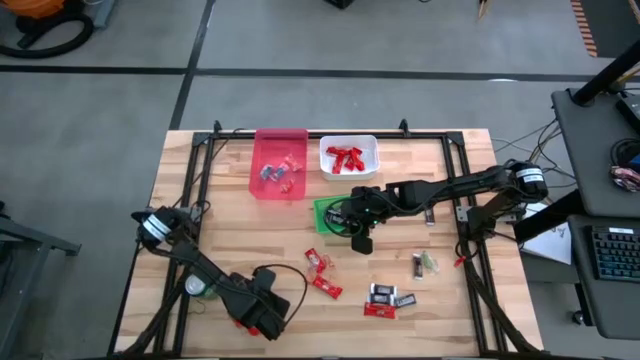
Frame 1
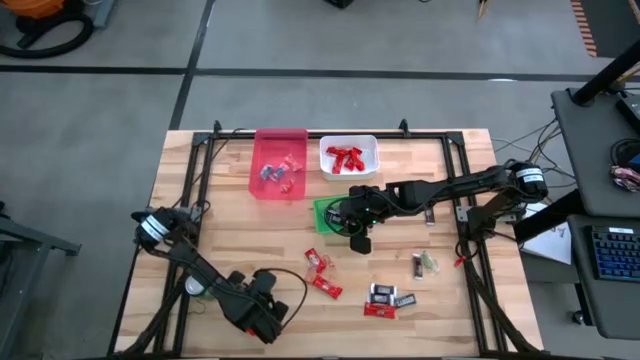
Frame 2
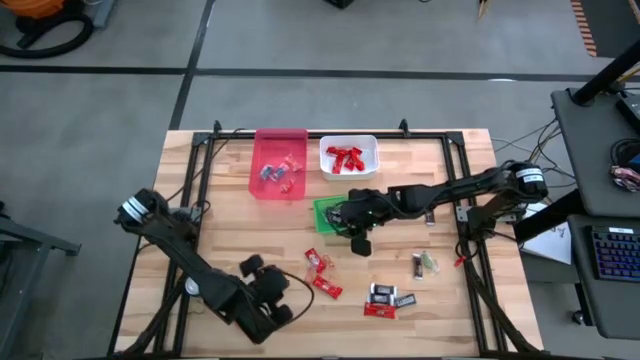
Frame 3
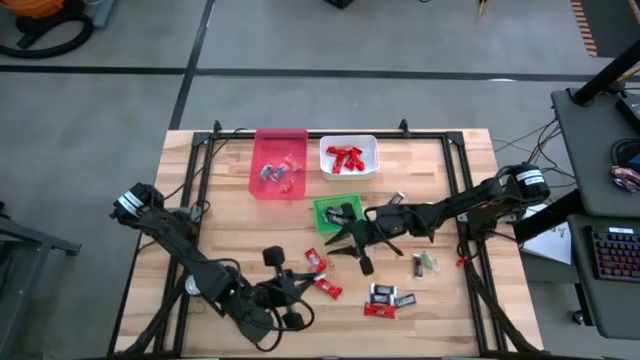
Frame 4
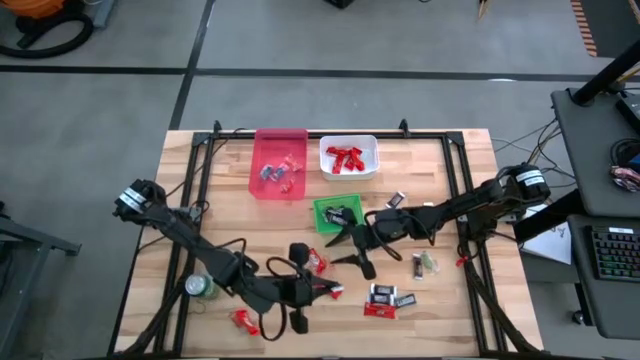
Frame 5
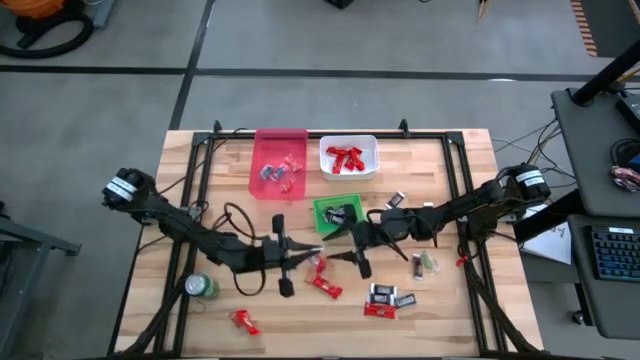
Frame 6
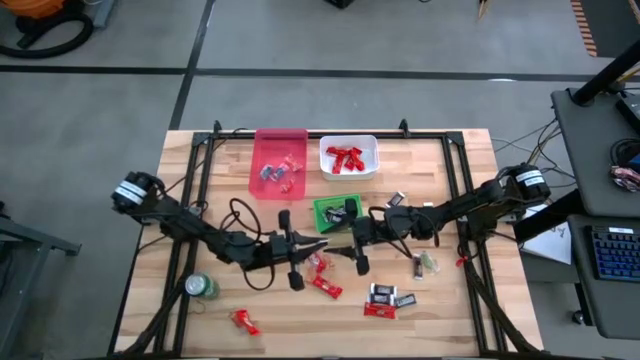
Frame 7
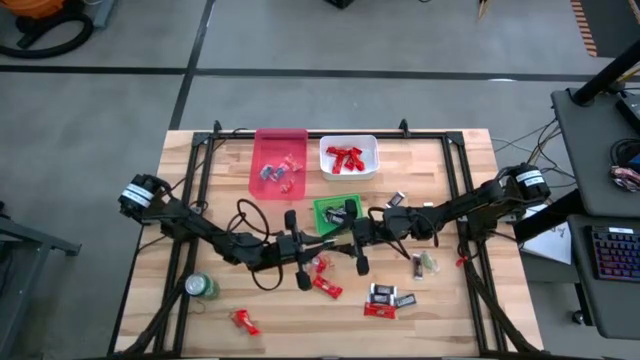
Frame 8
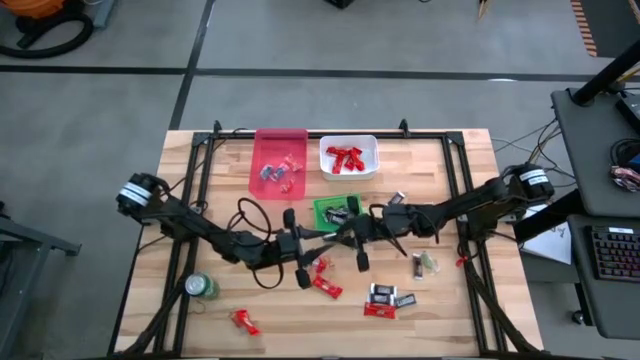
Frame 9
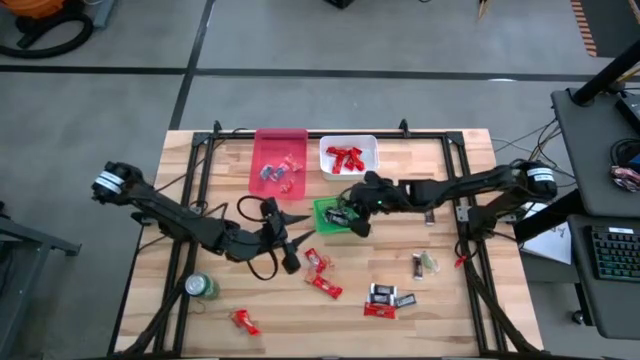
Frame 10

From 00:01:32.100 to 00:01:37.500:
Task: Sort candy
Put the brown chocolate bar into the green bin

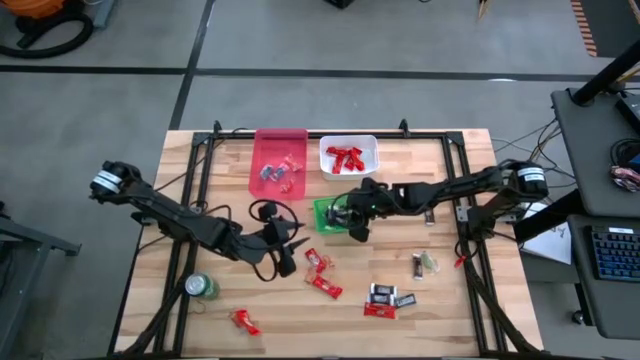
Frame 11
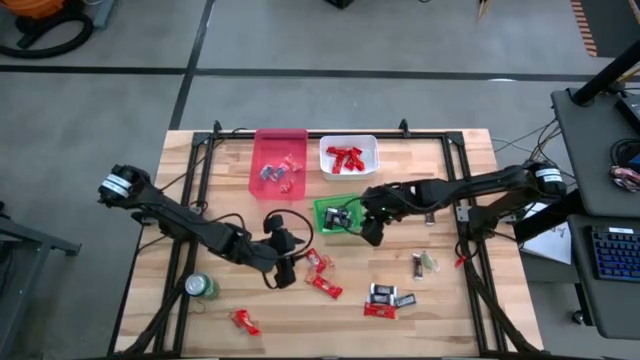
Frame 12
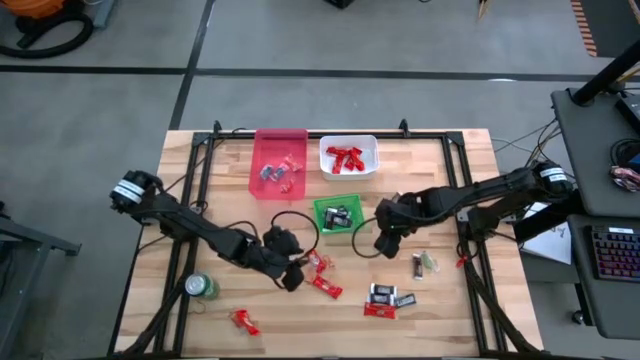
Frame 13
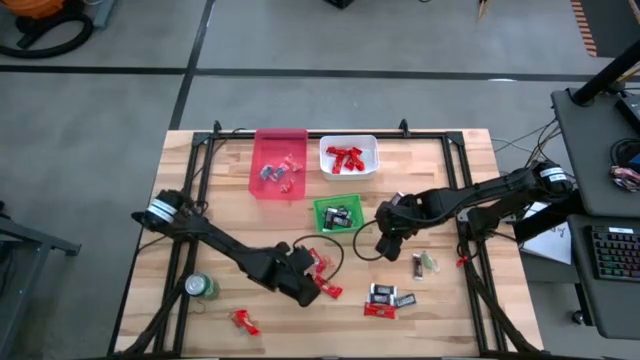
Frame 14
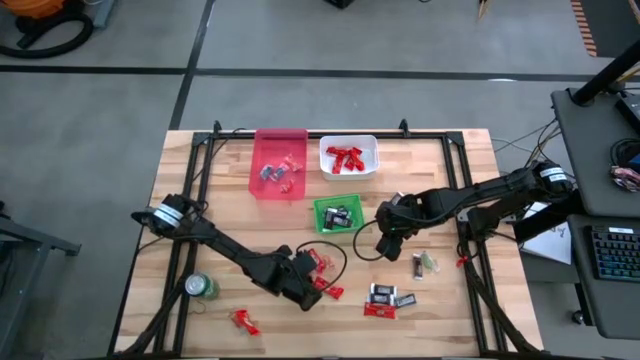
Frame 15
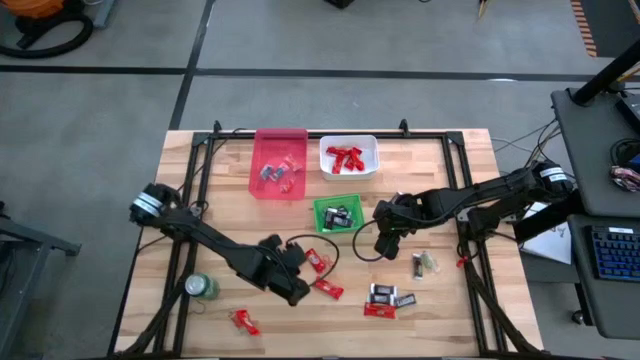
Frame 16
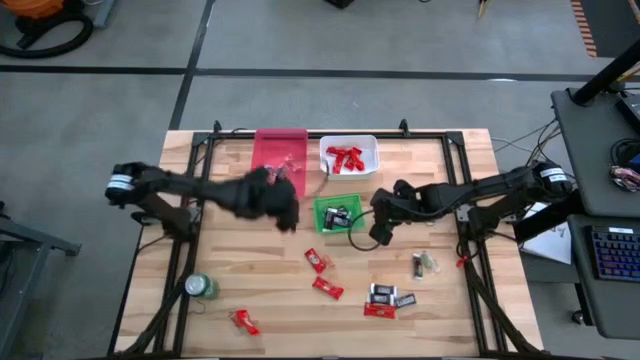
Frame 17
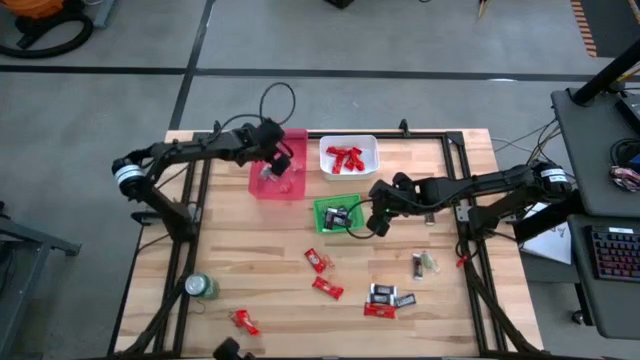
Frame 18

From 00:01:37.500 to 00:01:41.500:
Put the orange candy into the red bin

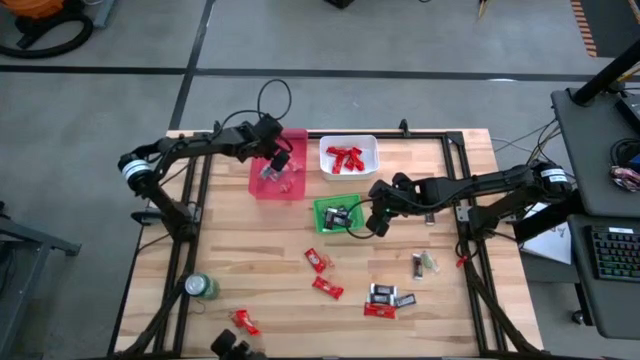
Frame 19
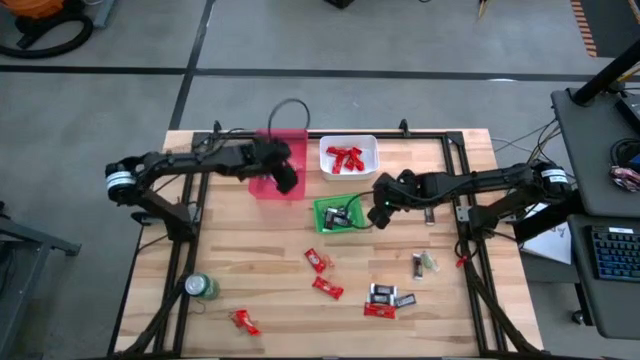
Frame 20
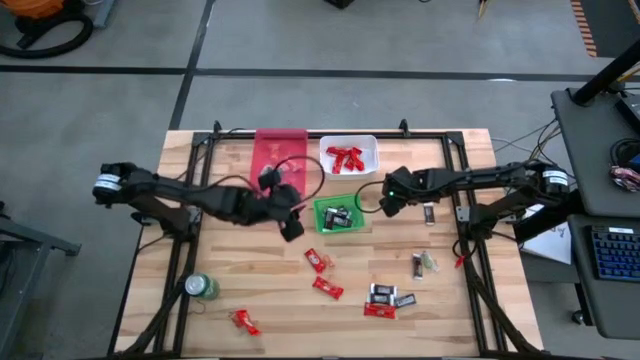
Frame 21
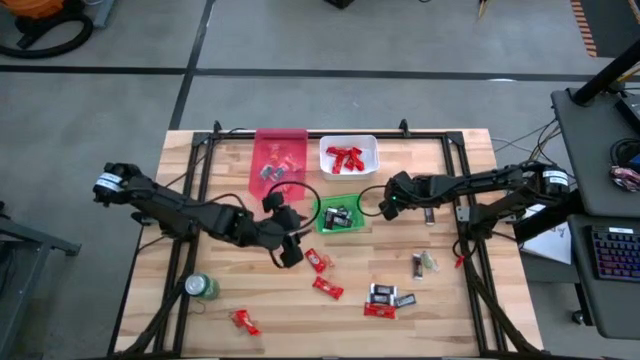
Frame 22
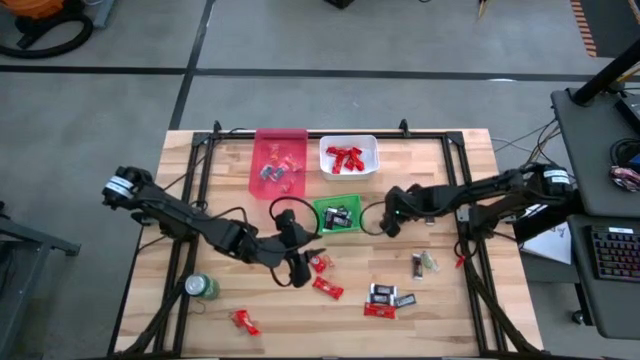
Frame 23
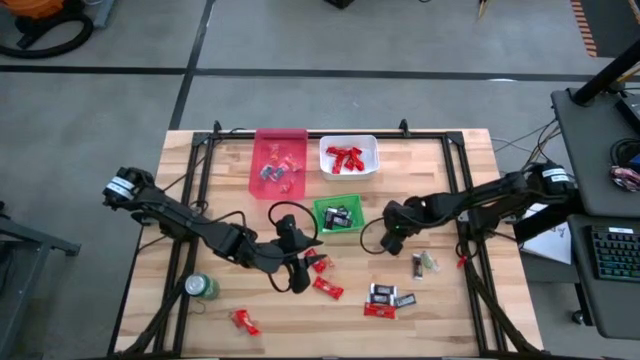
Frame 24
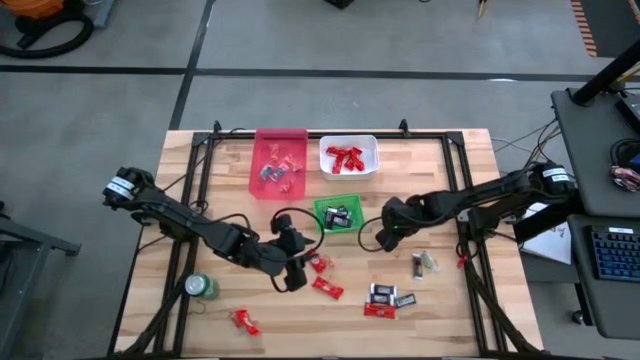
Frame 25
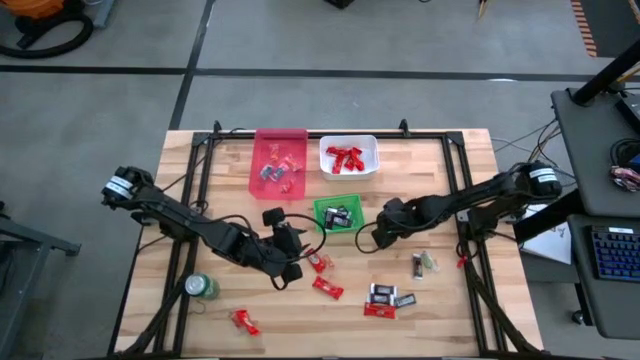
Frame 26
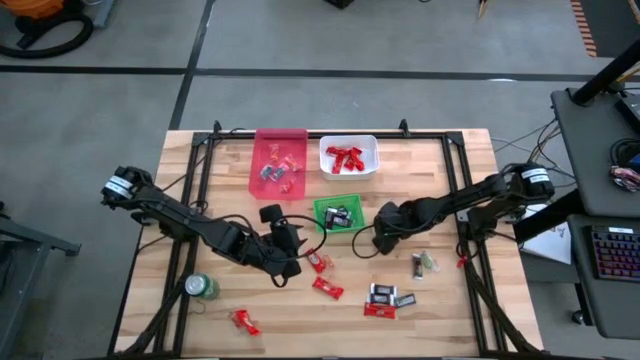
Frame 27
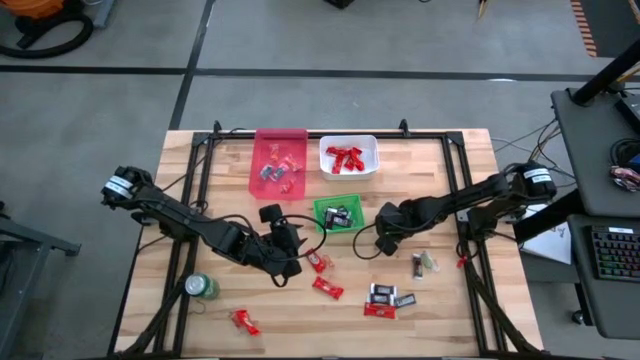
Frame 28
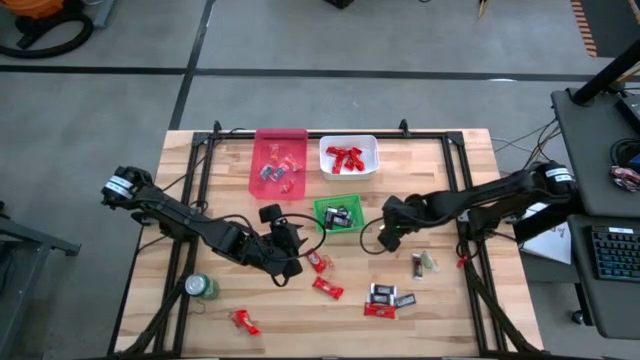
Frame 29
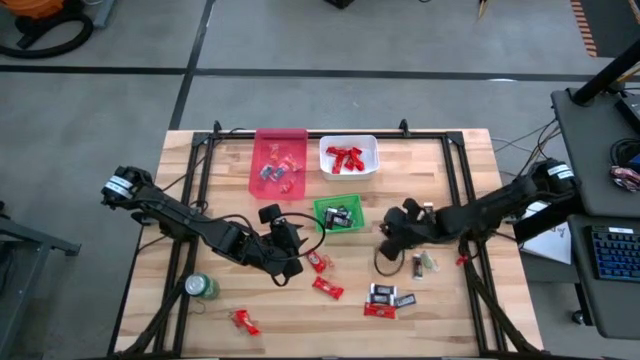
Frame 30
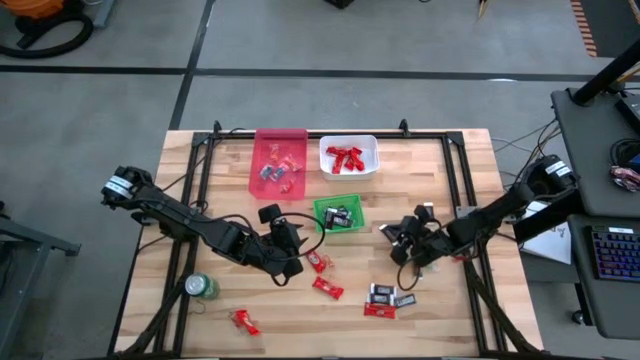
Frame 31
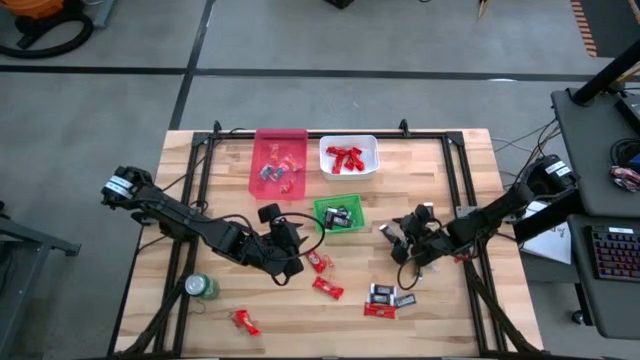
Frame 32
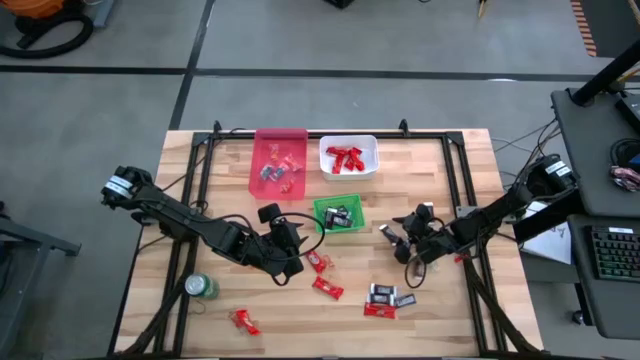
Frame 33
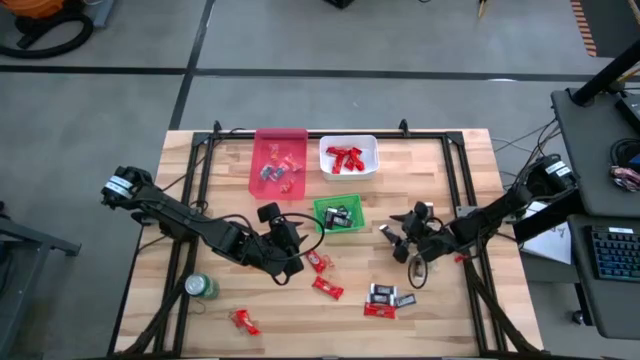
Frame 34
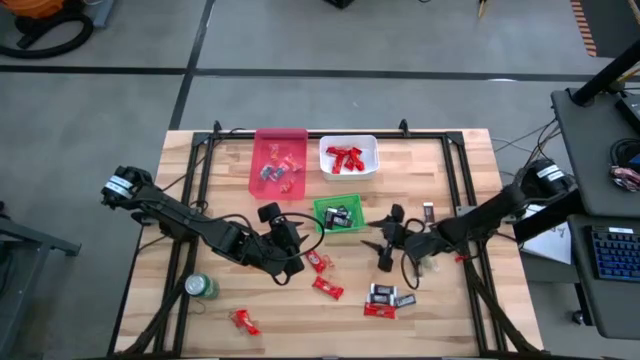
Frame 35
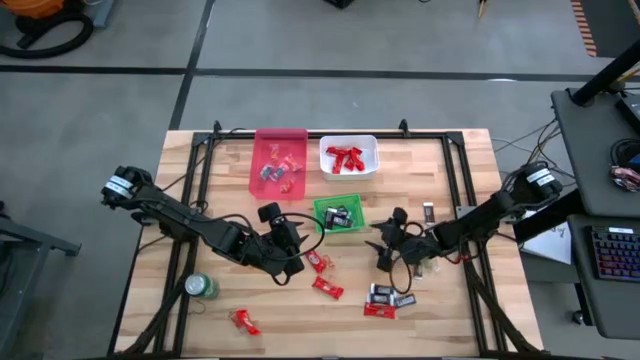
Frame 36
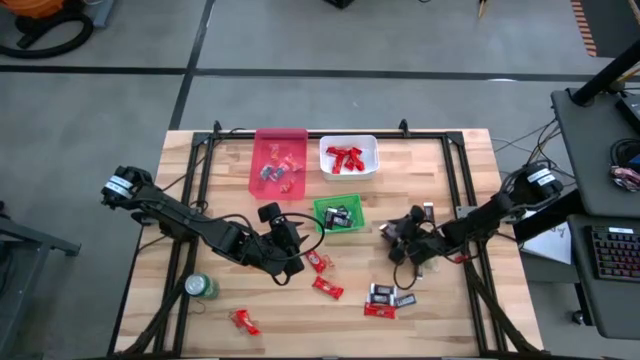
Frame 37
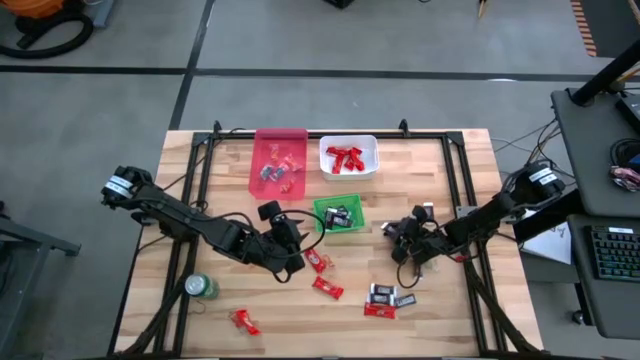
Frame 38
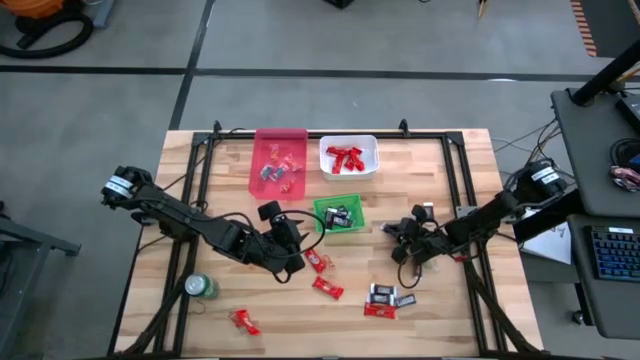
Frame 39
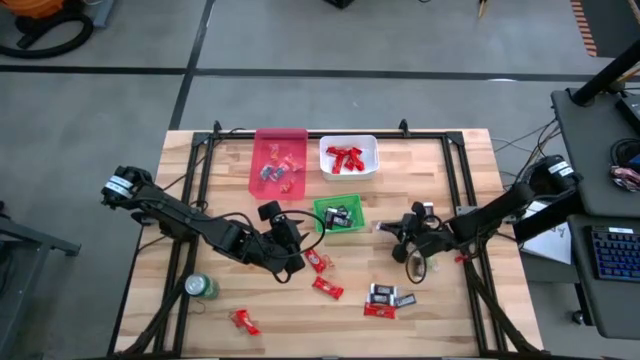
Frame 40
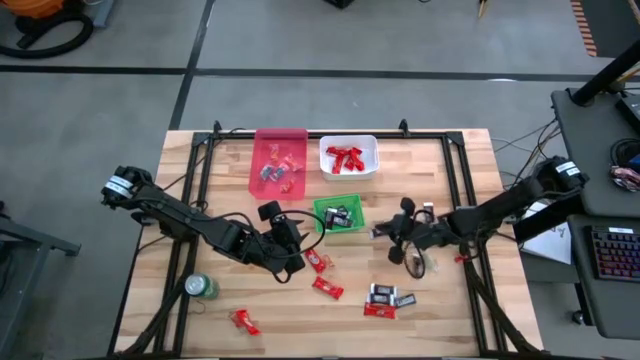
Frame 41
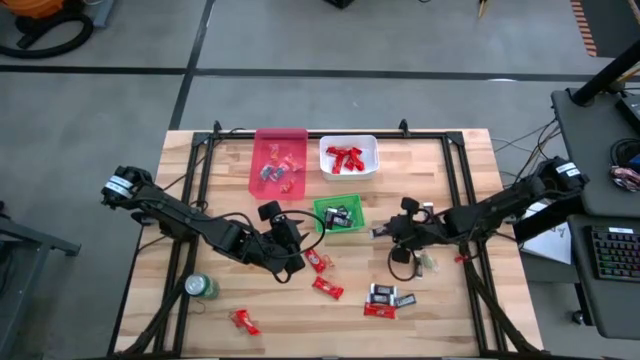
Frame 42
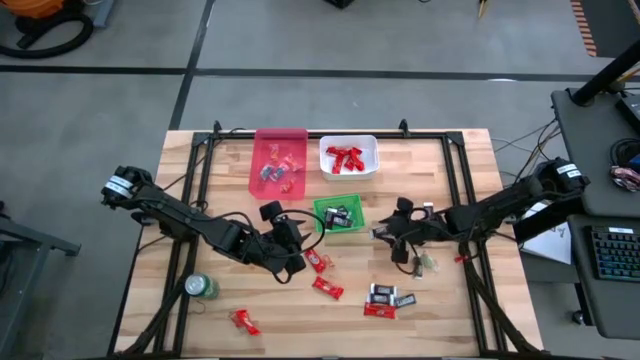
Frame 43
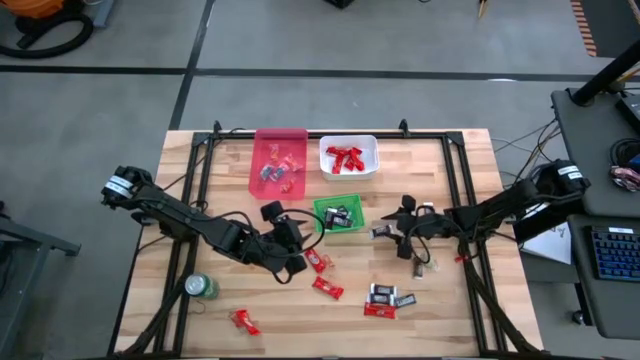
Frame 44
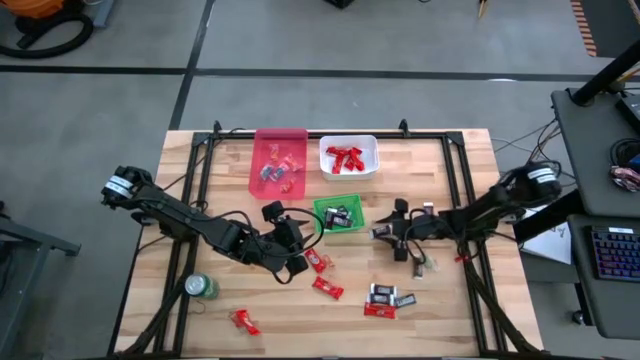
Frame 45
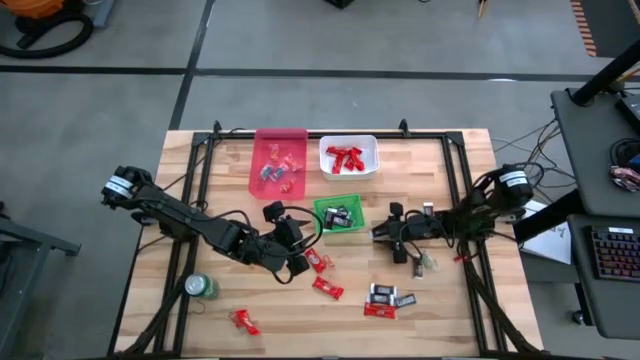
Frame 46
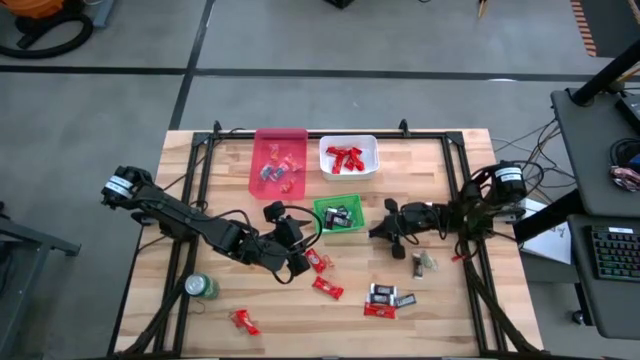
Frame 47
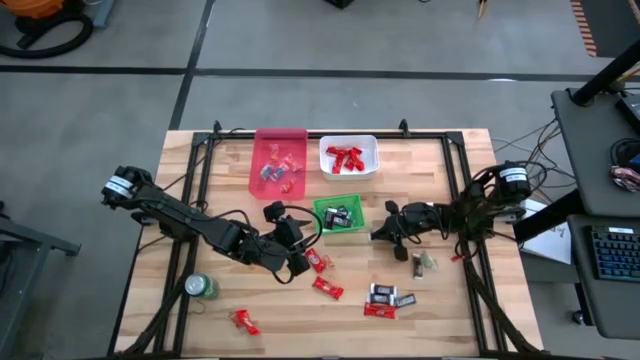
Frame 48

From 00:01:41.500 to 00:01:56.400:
Put the brown chocolate bar into the green bin
